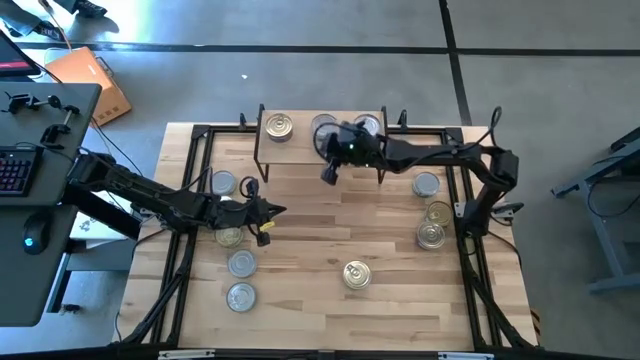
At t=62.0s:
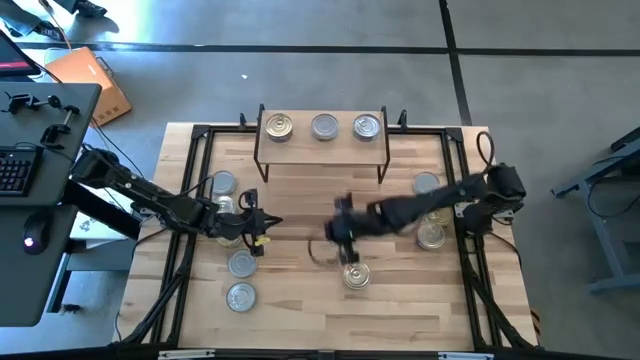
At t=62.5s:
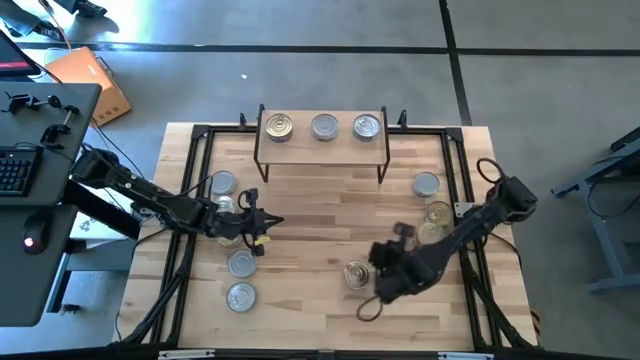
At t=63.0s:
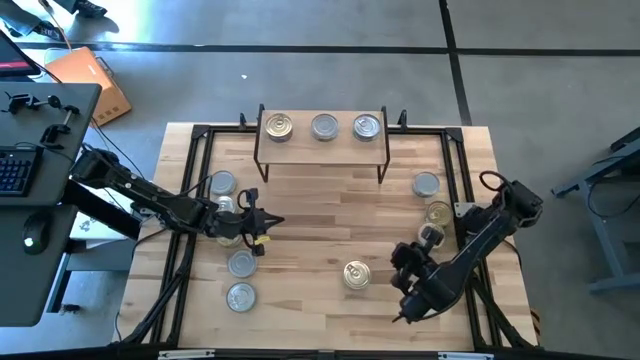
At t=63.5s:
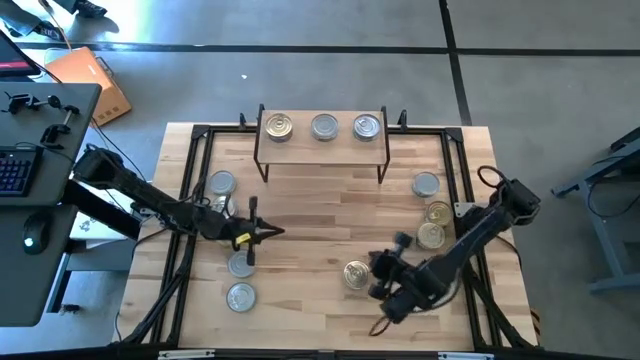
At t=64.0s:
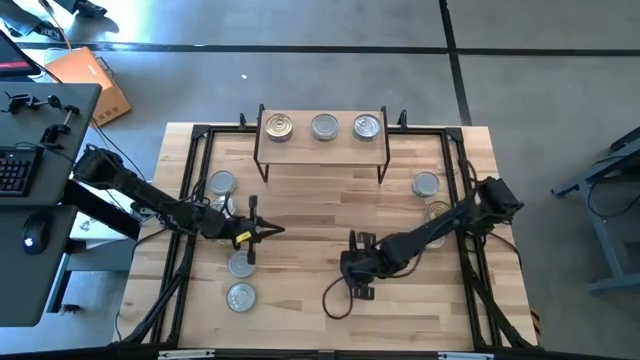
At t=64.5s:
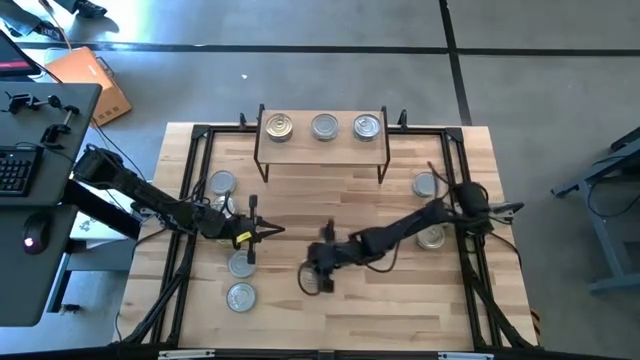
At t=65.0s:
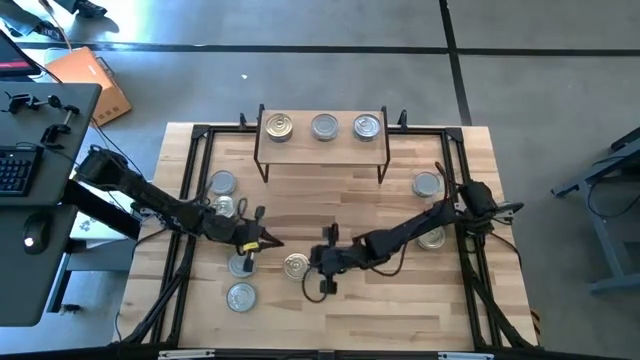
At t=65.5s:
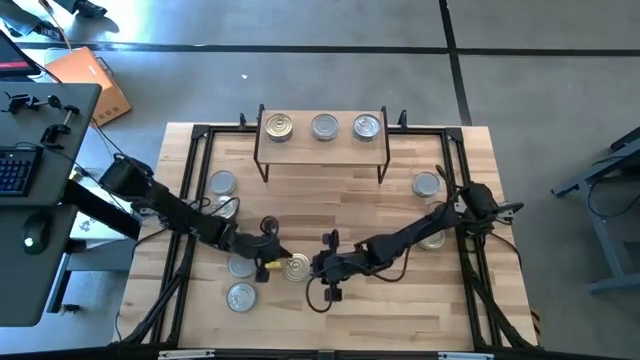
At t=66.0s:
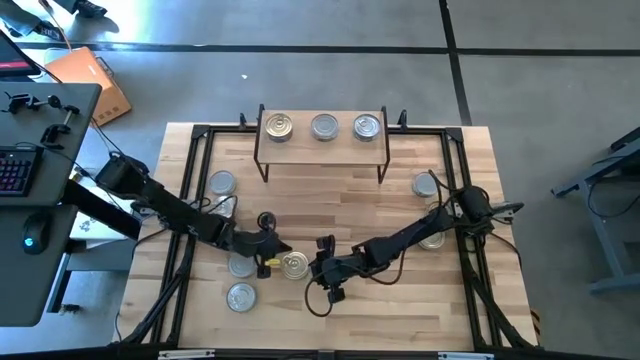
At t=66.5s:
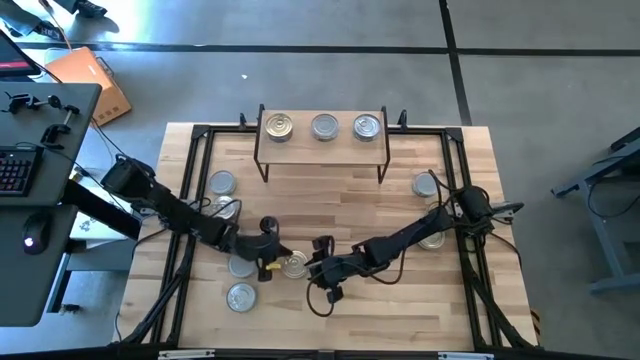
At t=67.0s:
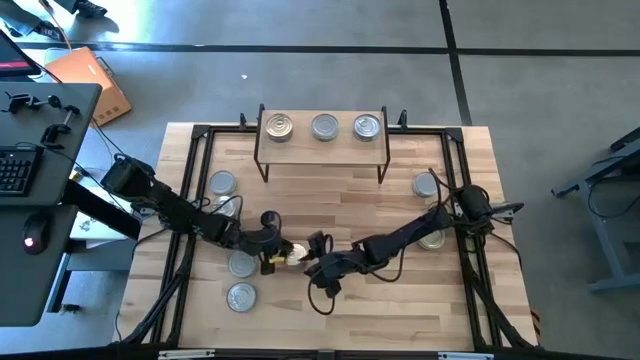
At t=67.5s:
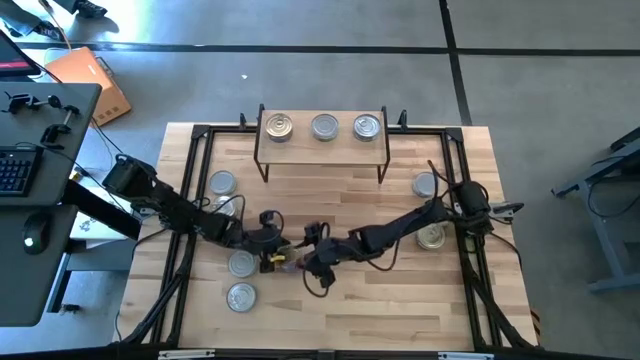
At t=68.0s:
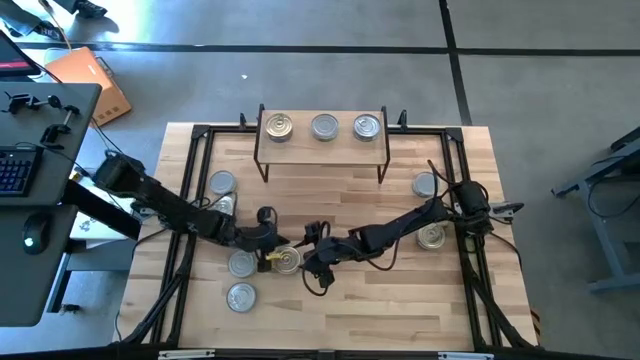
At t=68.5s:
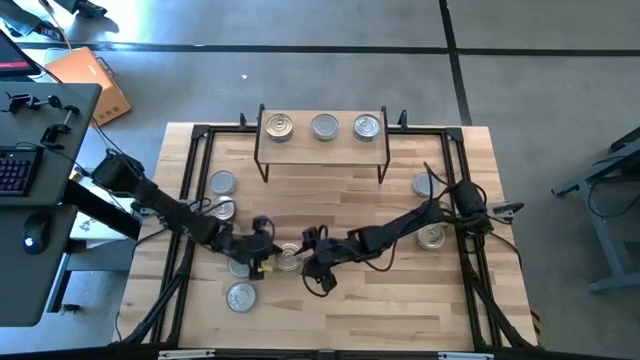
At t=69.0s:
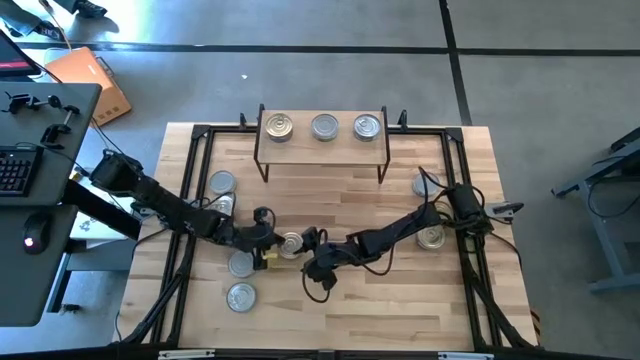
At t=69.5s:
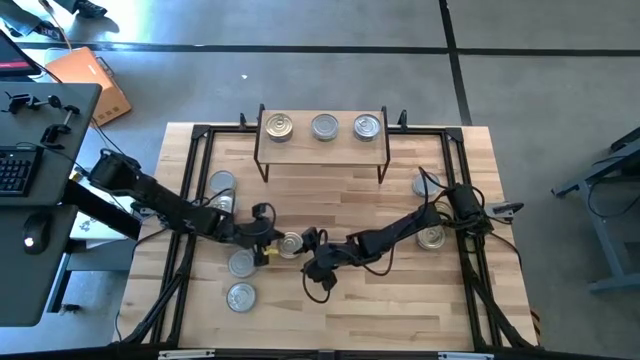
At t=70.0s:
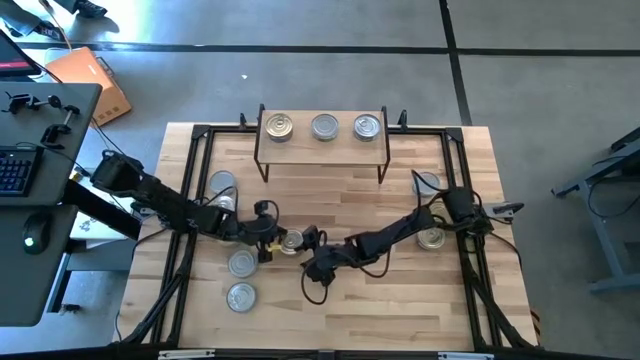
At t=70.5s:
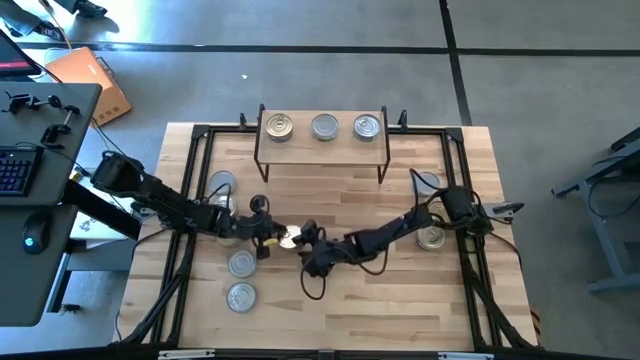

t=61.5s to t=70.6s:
Task: Stack canned seafood by type on shelf
Put the middle blue and pink tuna can on the shelf aligned with the other blue and pink tuna can

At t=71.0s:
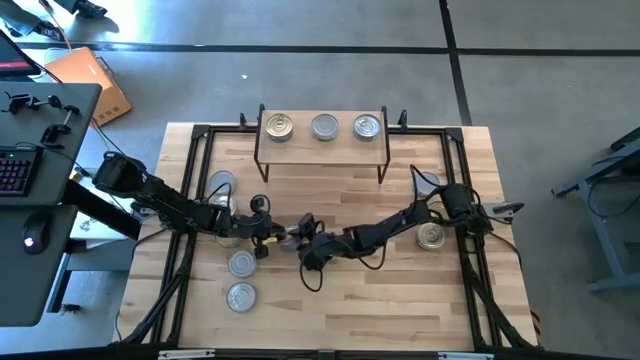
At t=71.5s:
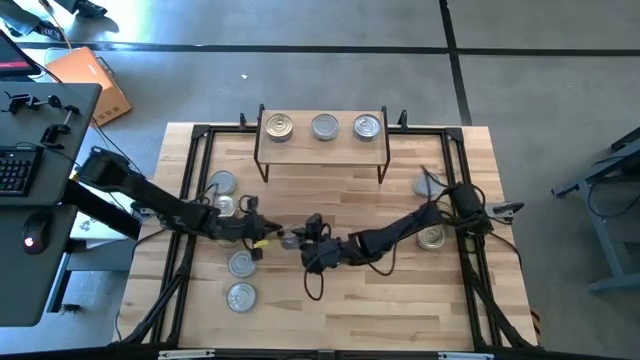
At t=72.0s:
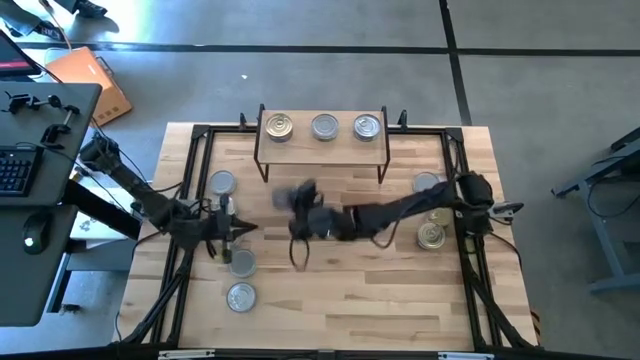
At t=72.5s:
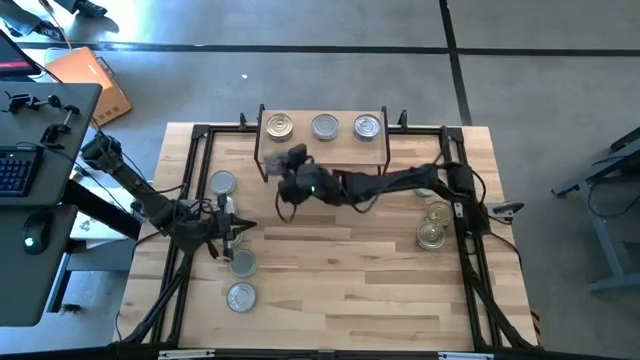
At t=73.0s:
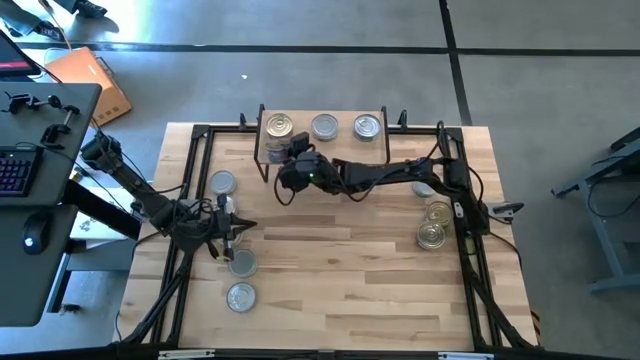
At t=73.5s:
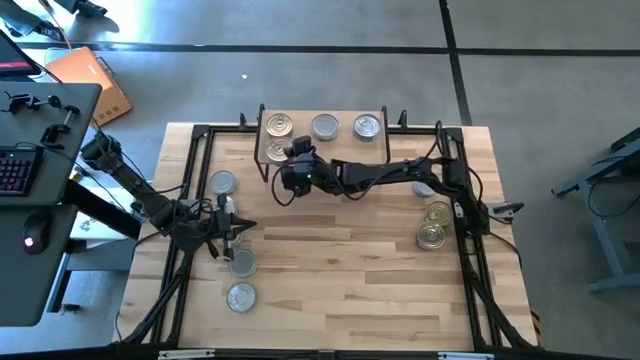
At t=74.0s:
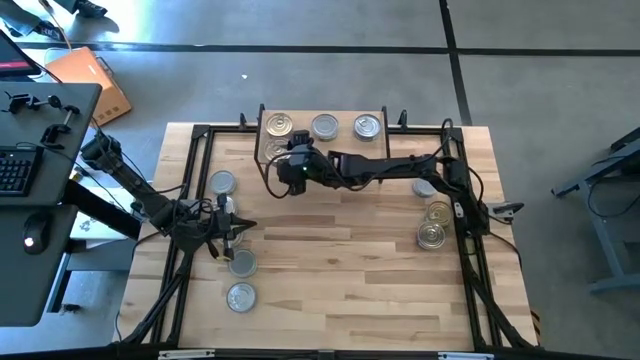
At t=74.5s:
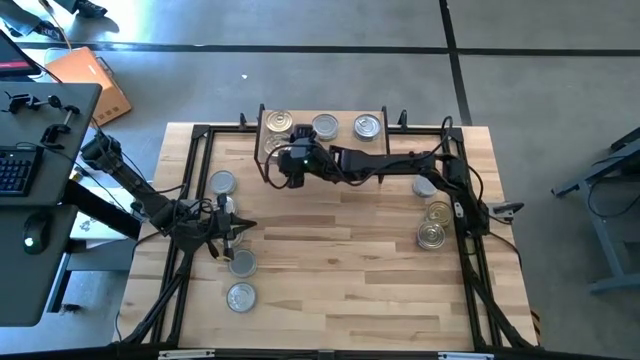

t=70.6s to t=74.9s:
Put the middle blue and pink tuna can on the shelf aligned with the other blue and pink tuna can

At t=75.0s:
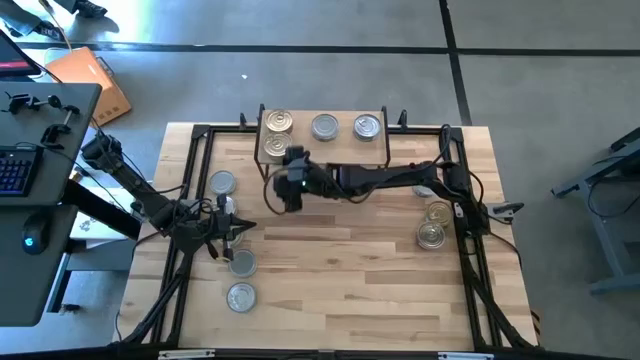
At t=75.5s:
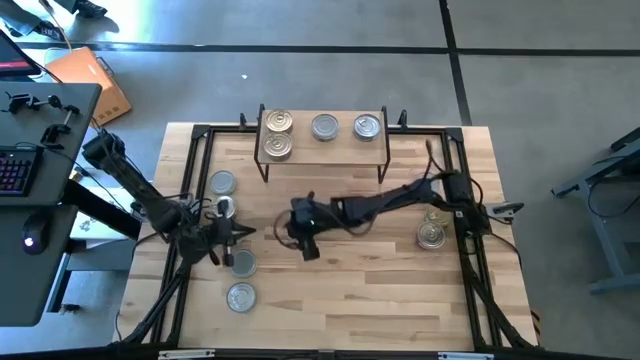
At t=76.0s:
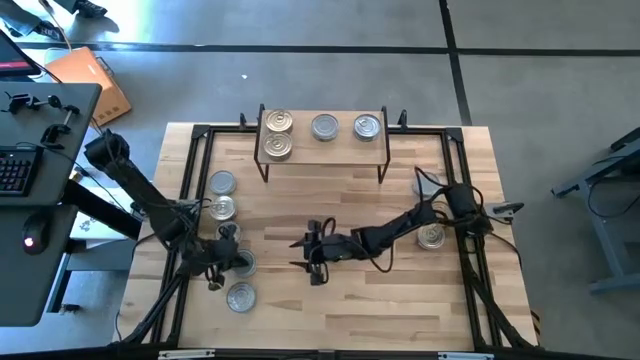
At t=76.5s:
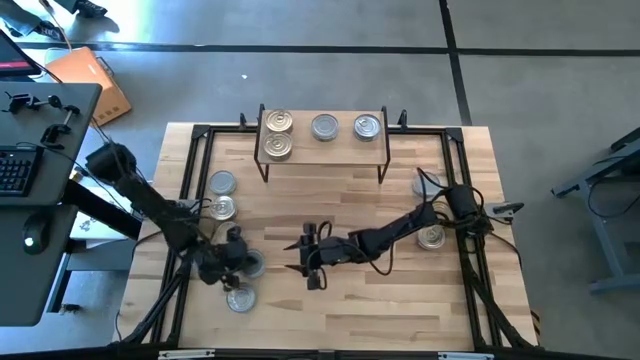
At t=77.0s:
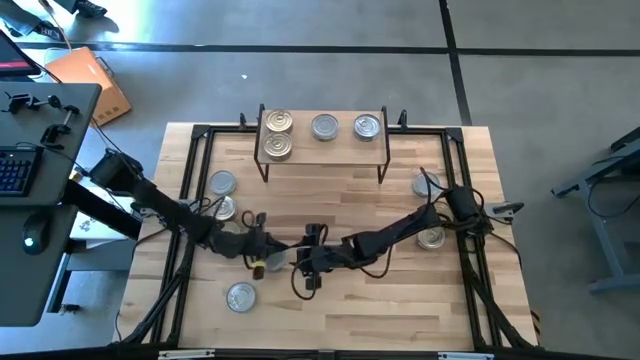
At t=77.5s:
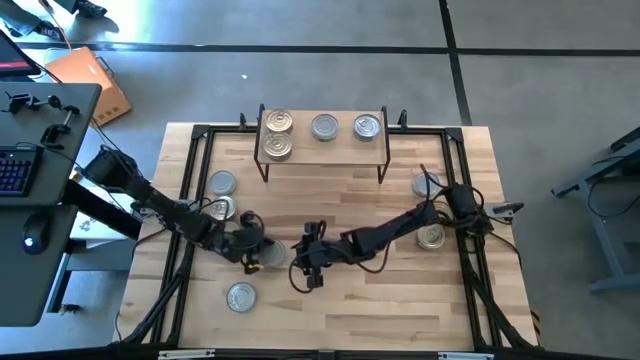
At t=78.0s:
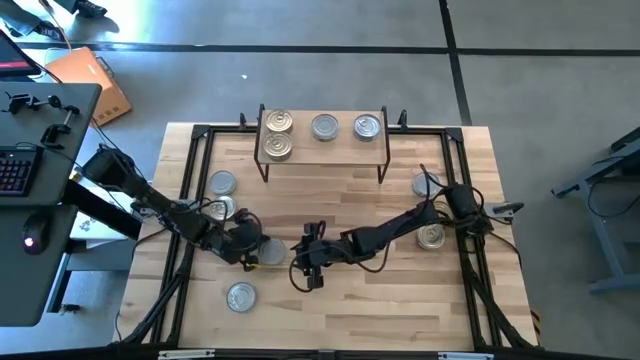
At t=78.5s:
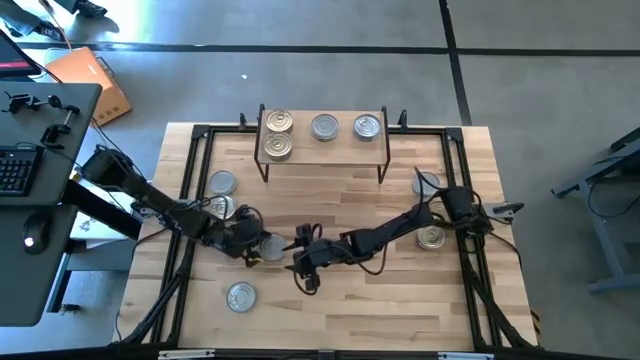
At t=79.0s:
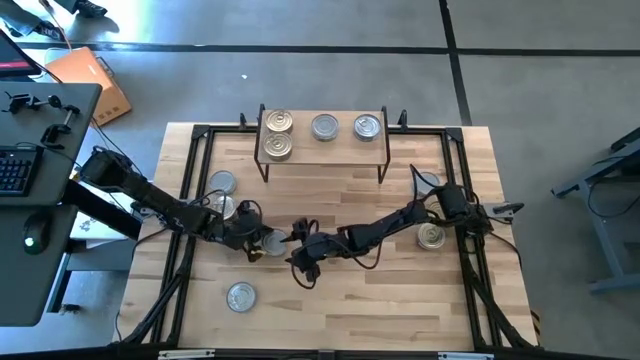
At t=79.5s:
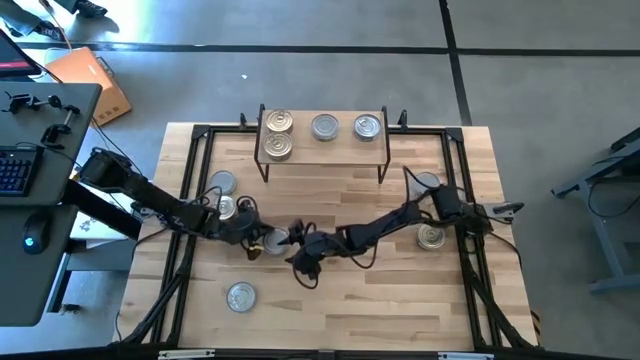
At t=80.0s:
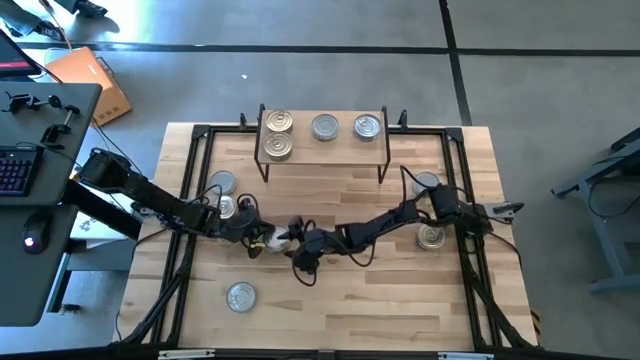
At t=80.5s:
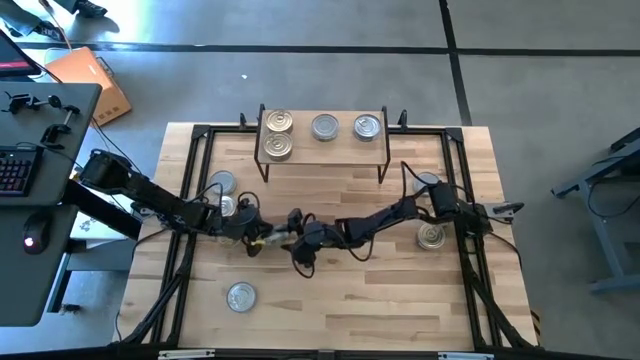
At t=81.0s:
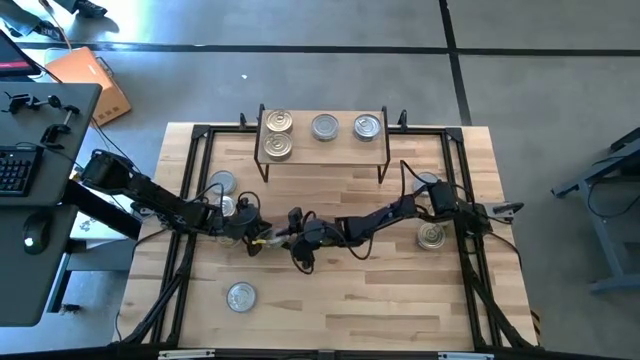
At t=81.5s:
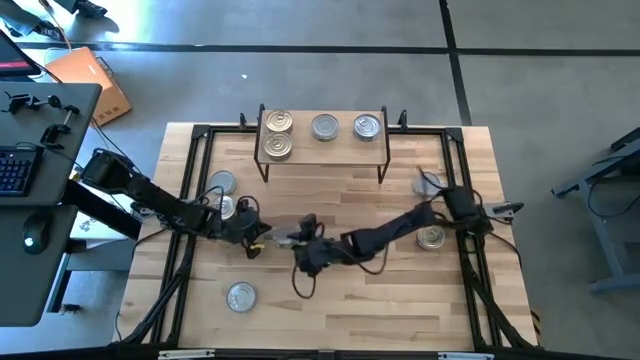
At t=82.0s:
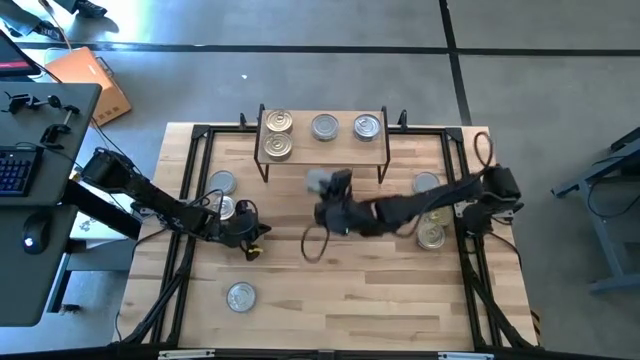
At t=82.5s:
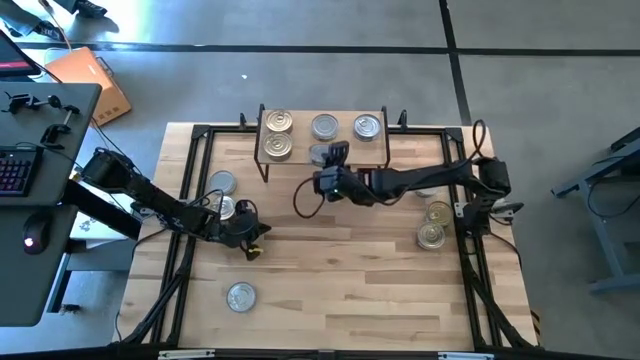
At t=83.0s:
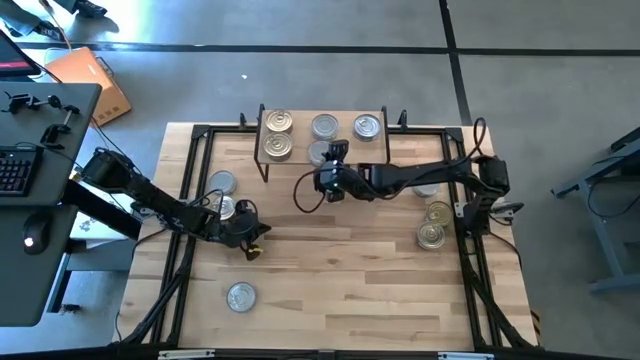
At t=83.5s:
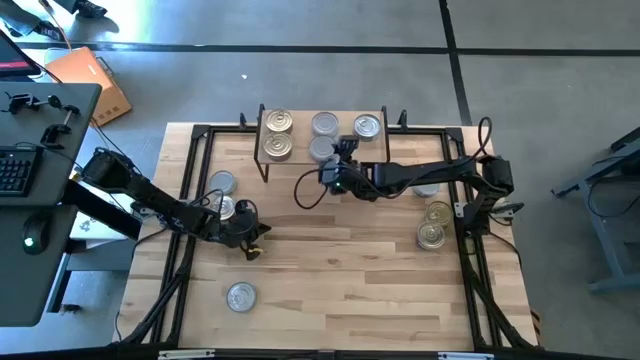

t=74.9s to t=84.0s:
Put the bottom green and white tuna can on the shelf aligned with the other green and white tuna can
